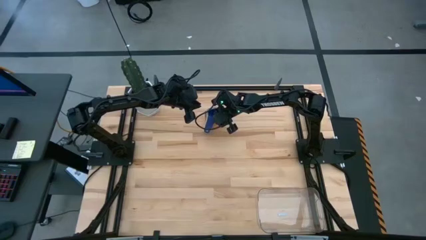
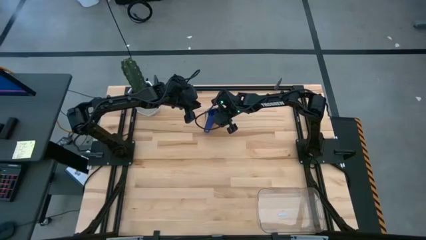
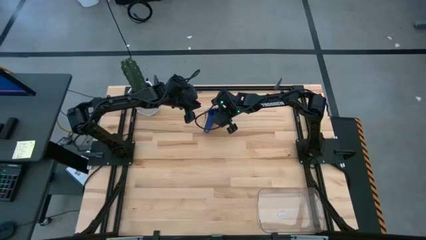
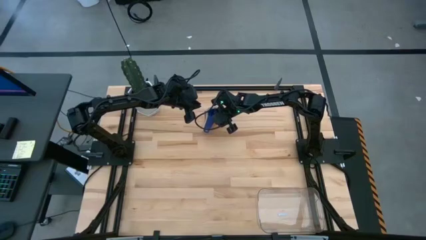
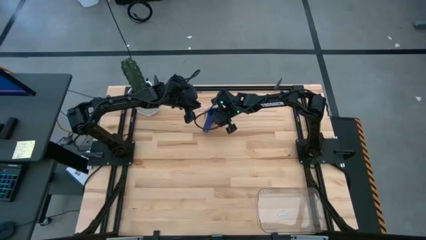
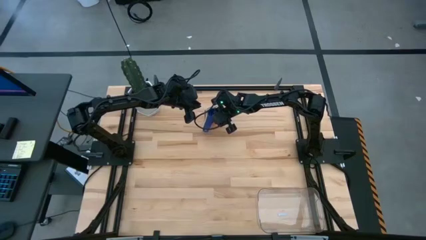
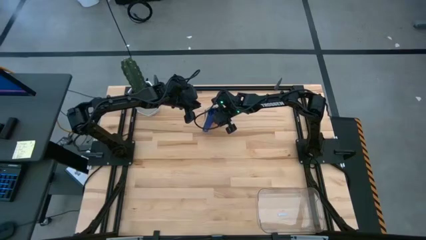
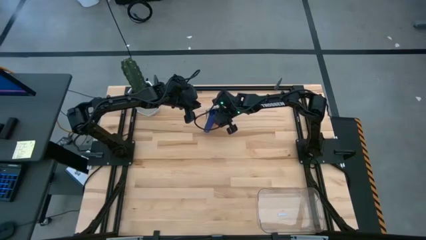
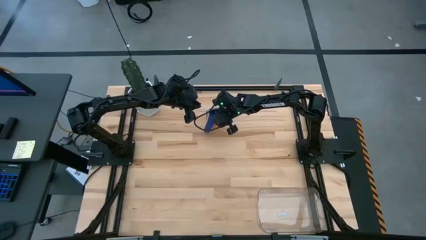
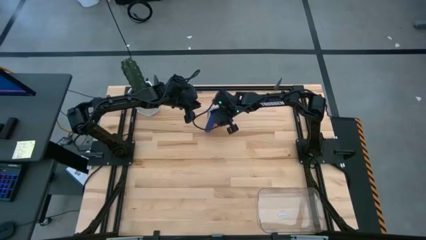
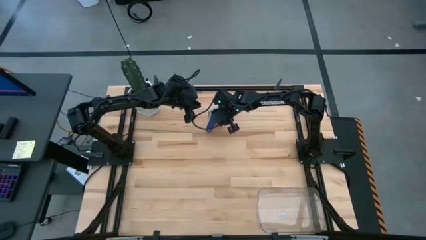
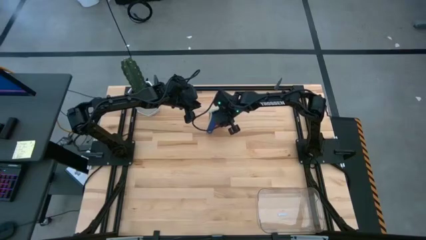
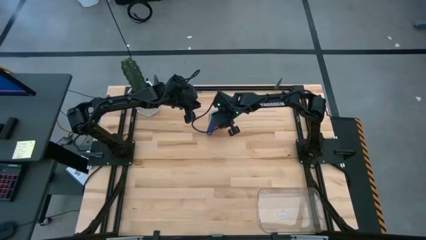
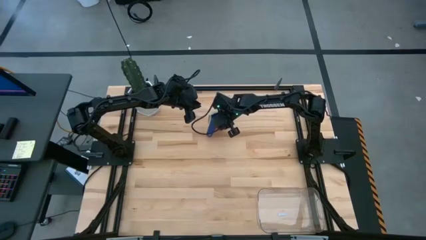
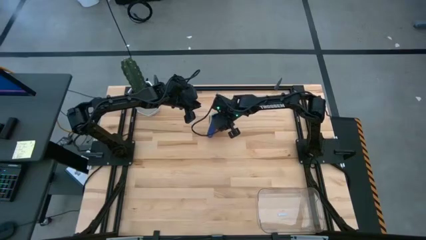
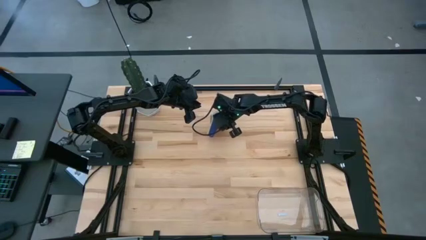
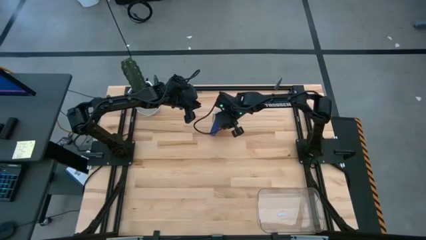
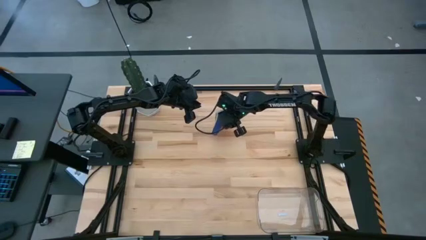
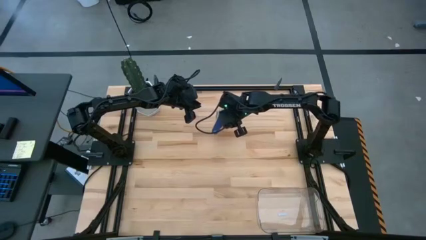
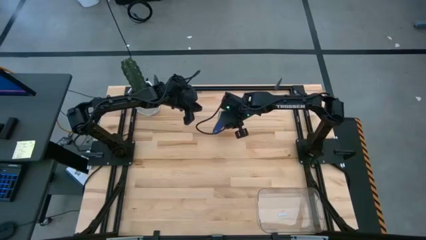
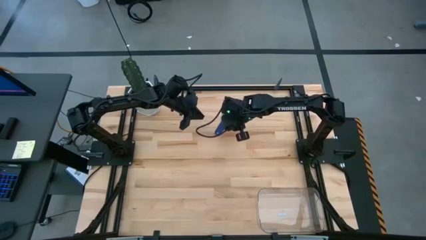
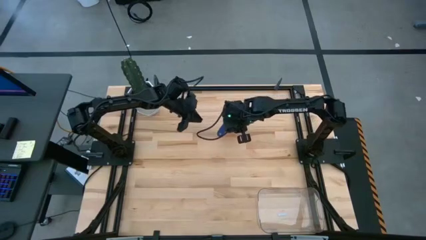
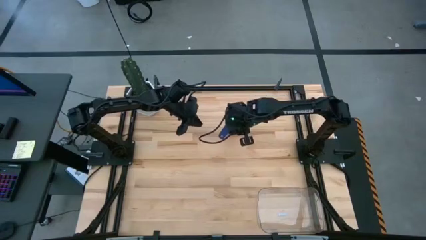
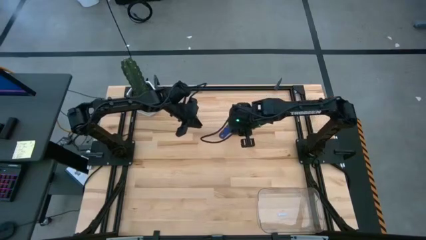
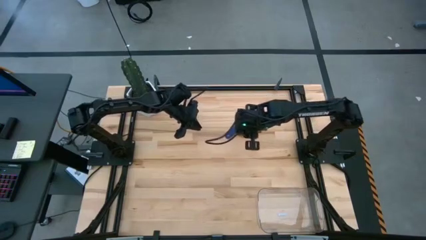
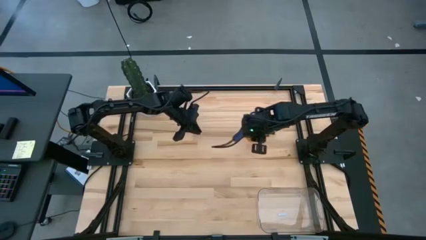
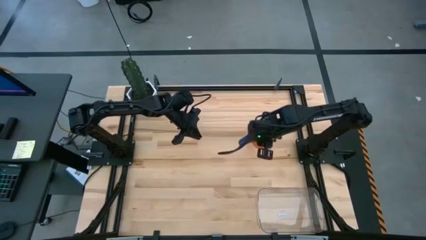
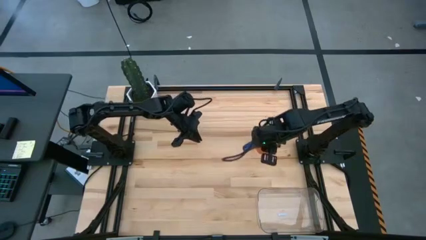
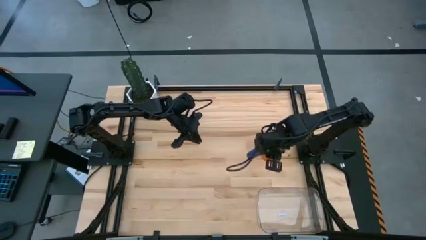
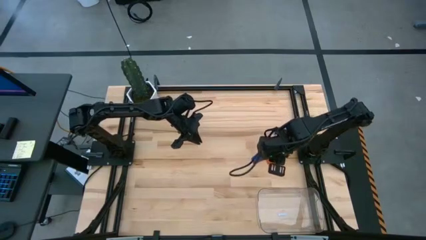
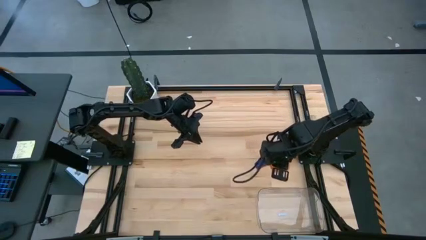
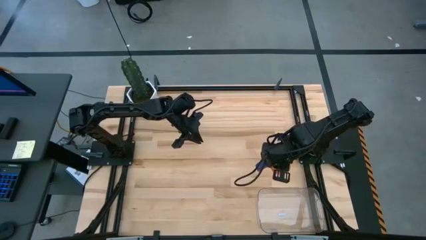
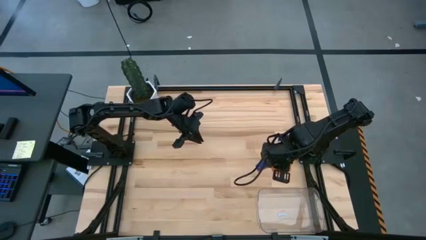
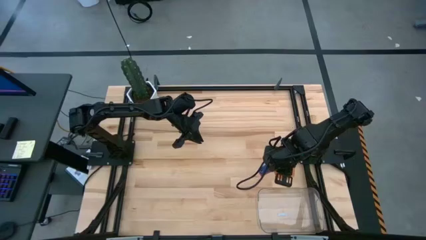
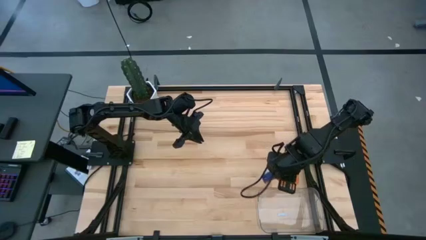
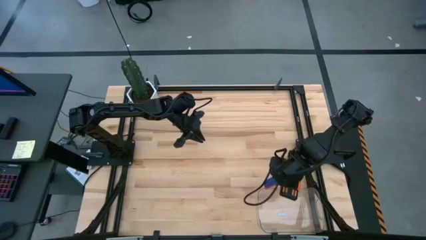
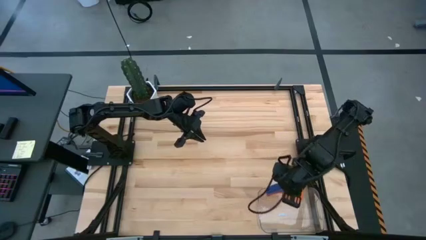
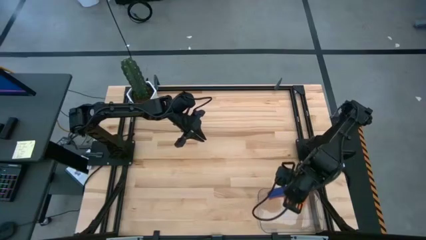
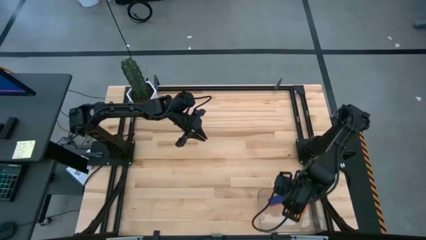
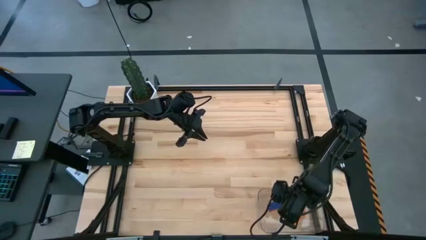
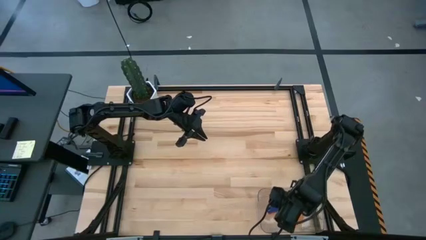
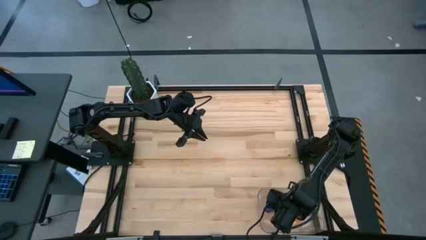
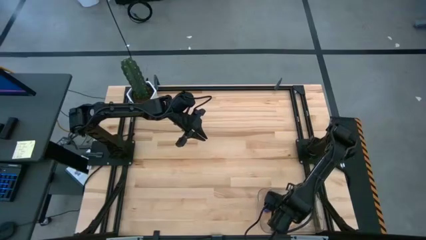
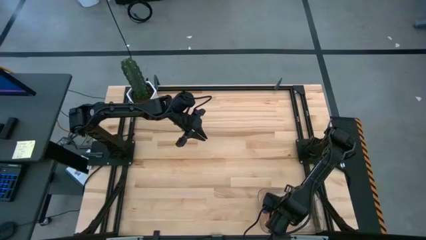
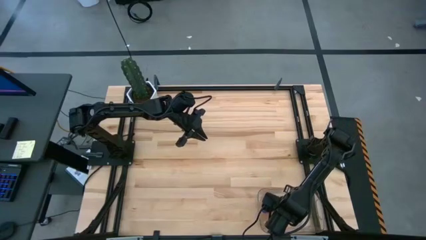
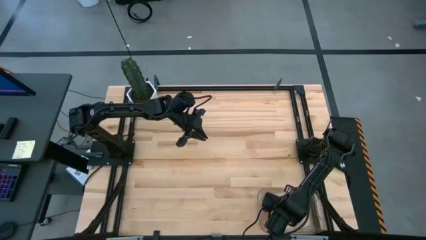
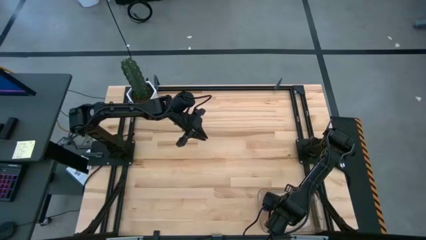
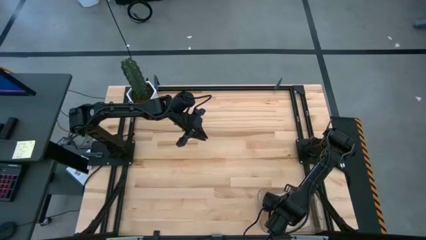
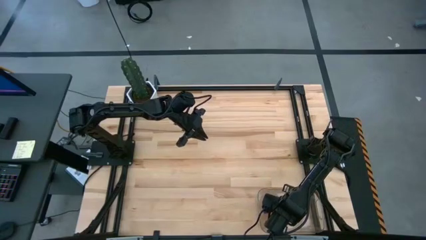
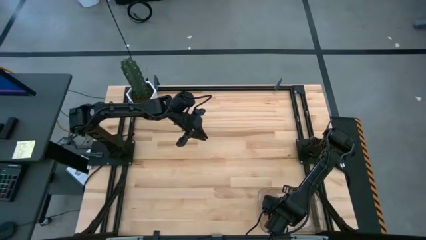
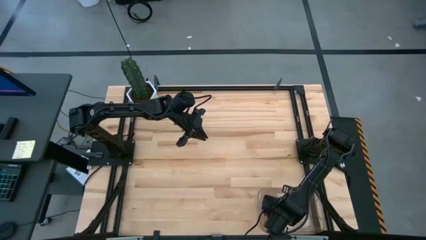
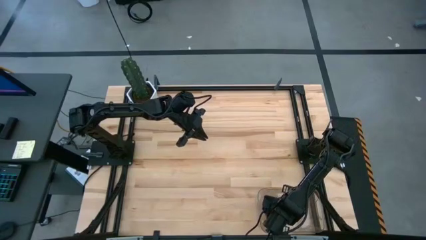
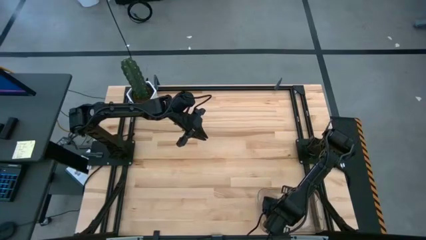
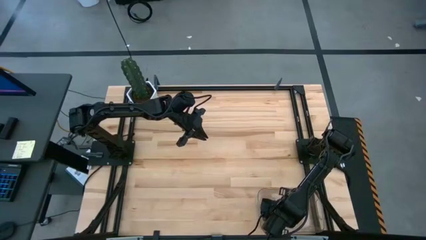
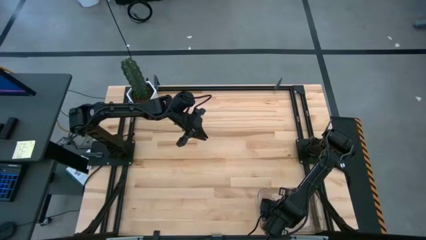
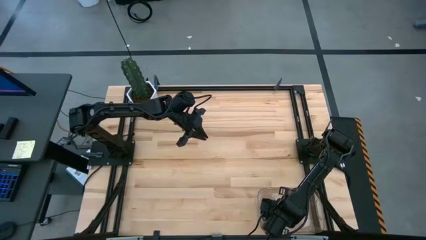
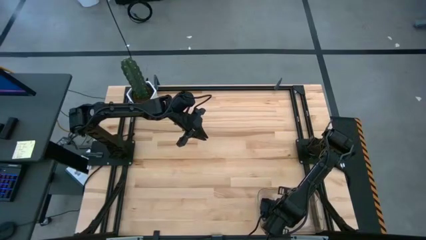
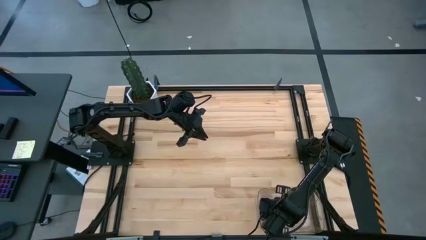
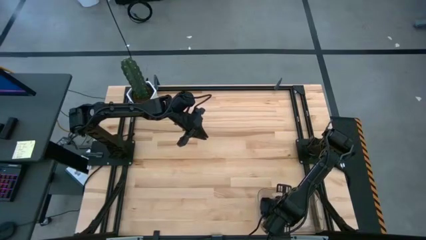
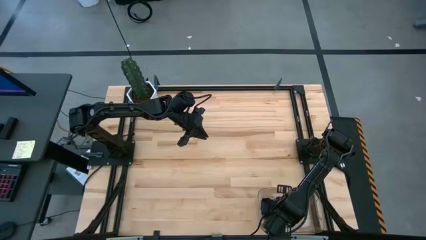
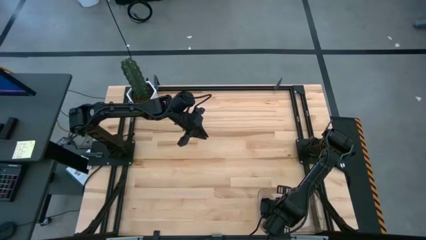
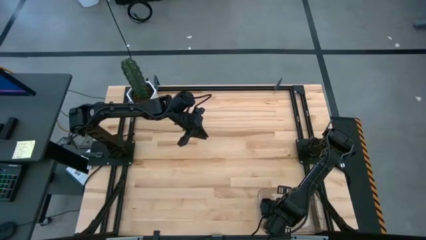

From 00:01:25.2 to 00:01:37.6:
Task: Nest measuring cups in basket
Put the stacked measuring cups into the transparent bin

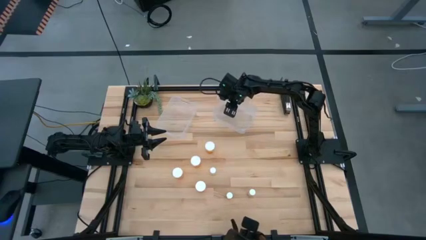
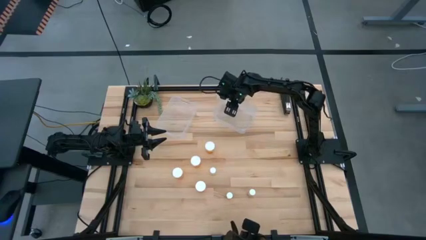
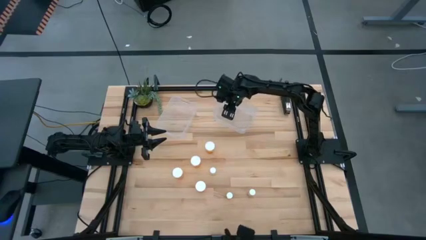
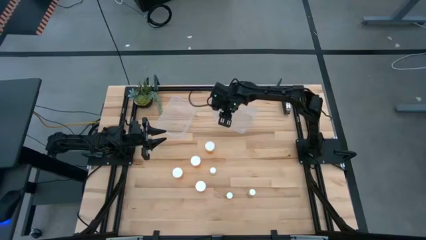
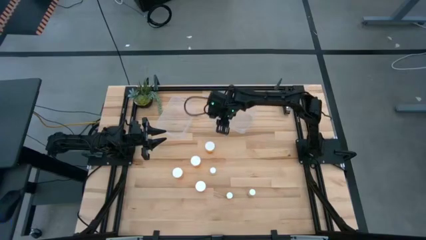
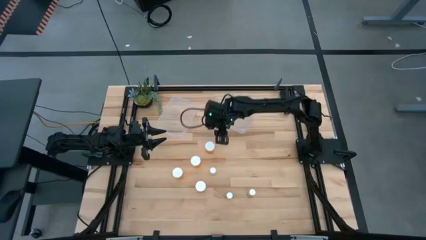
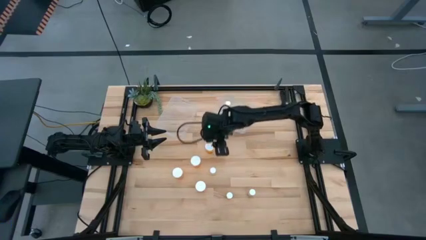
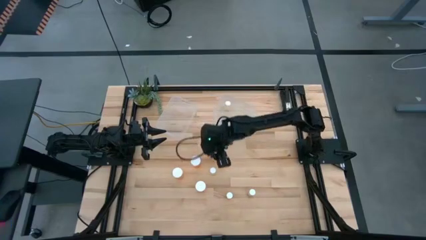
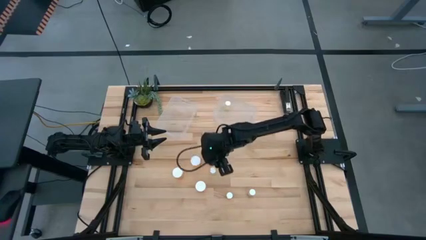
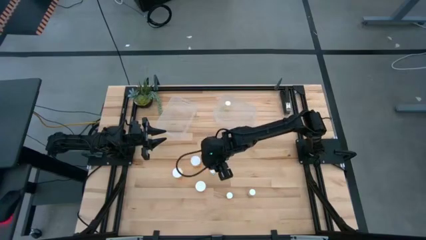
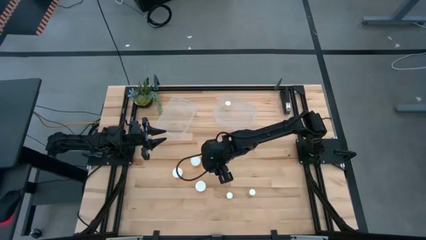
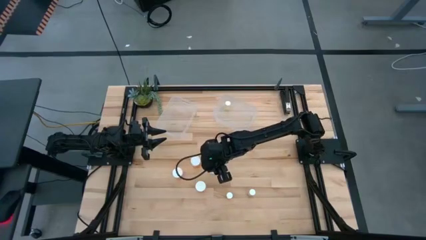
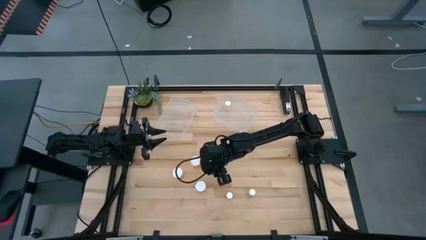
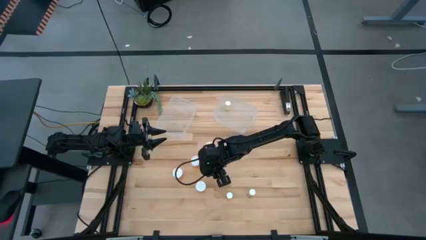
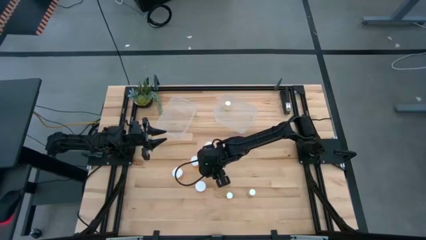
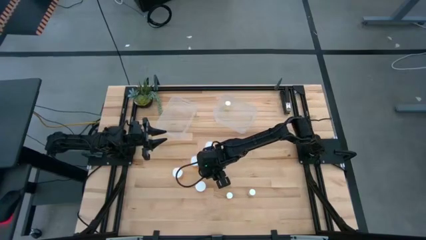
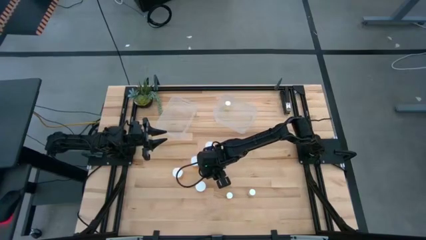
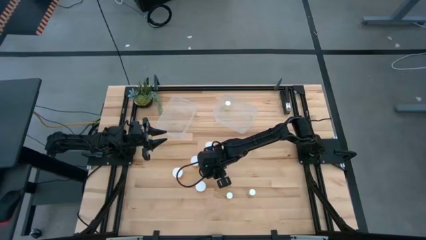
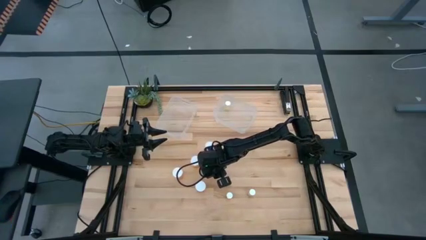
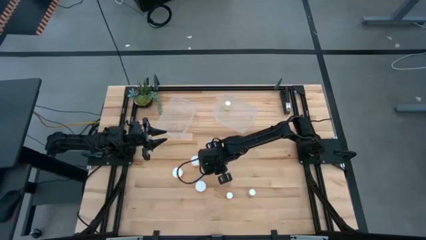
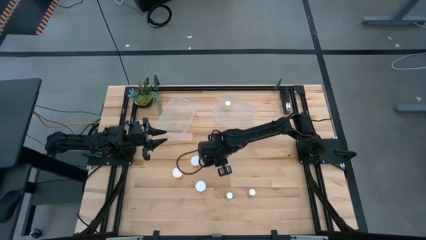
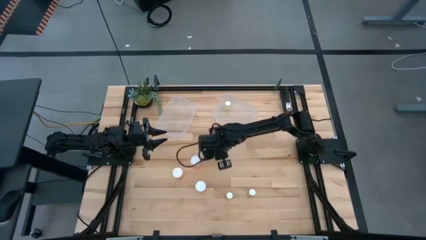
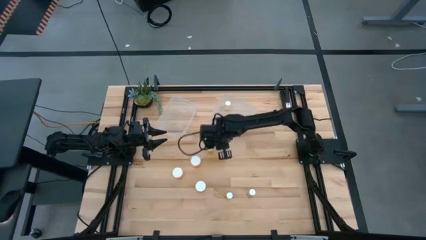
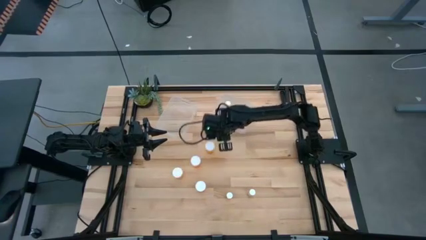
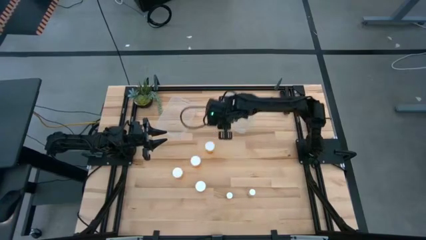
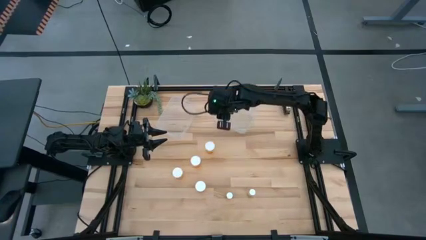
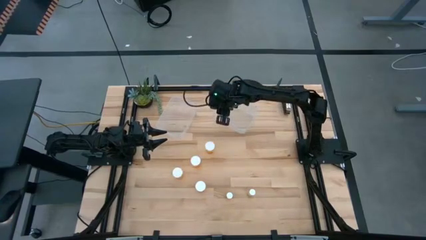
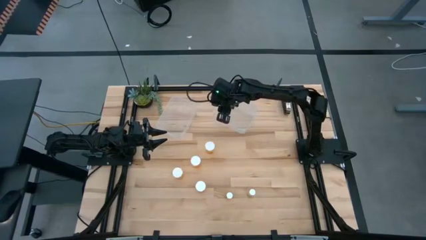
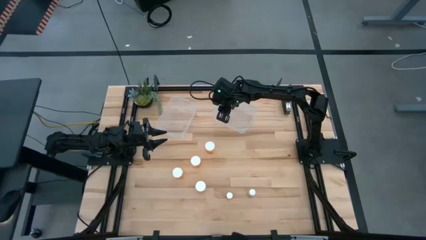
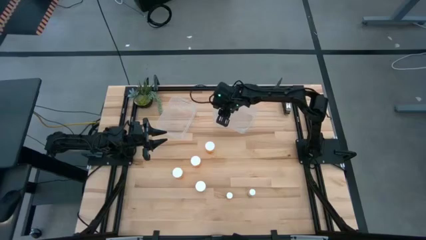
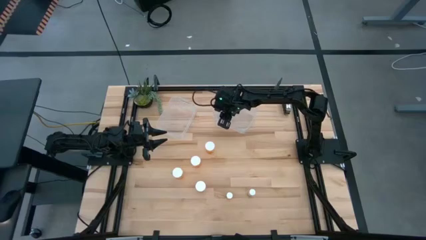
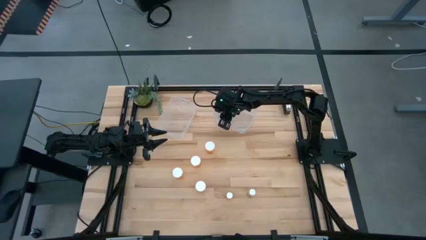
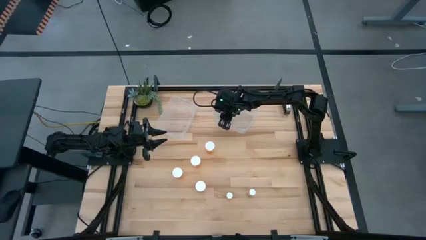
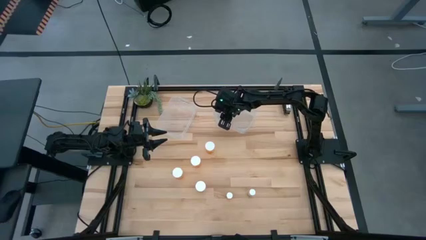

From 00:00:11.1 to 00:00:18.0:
Task: Pick and place medicine bottles into bin by pill shape (circle, oval)
Put the small yellow pill bottle into the right transparent bin
